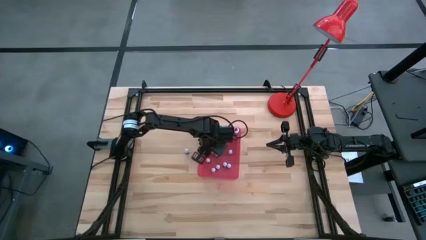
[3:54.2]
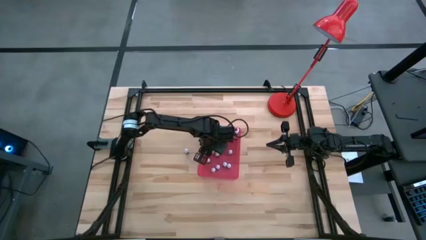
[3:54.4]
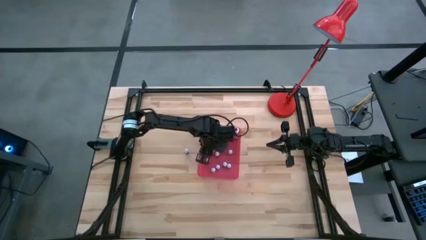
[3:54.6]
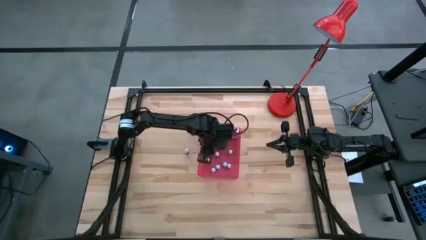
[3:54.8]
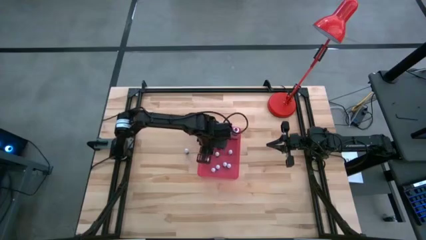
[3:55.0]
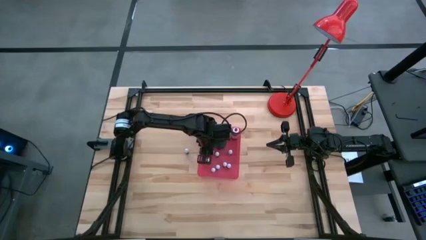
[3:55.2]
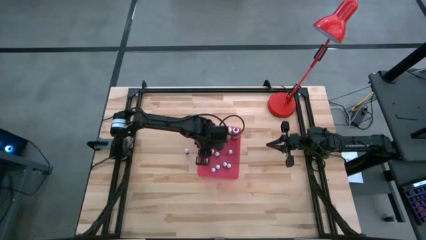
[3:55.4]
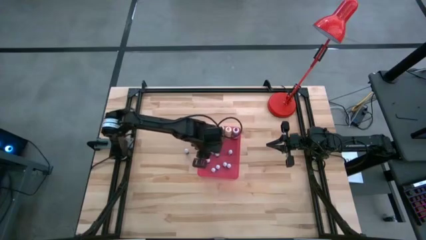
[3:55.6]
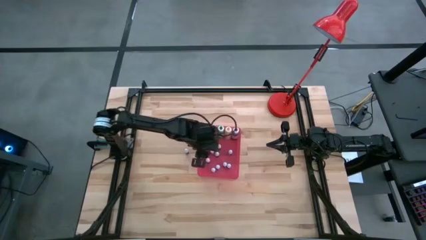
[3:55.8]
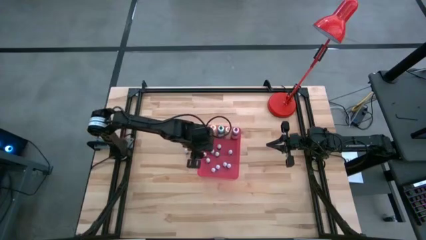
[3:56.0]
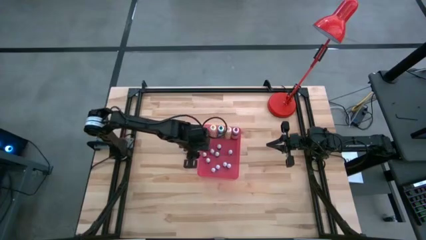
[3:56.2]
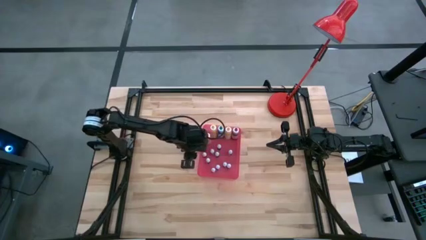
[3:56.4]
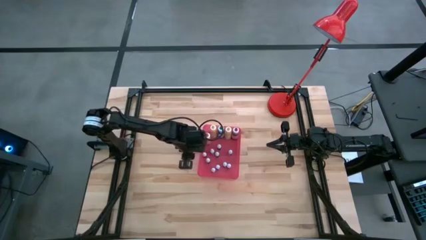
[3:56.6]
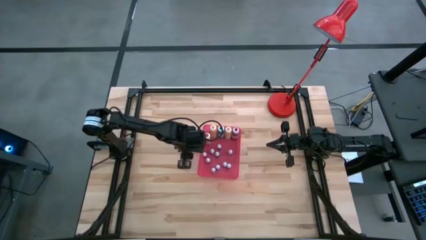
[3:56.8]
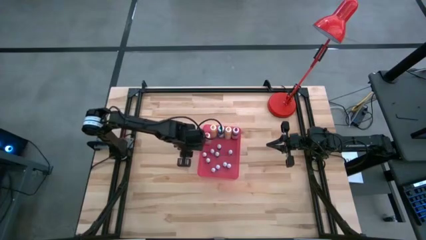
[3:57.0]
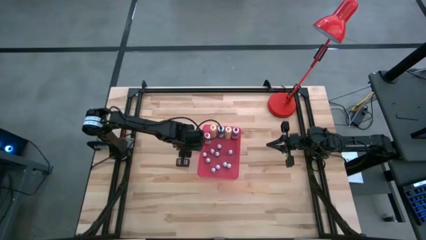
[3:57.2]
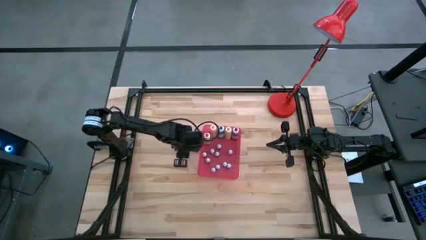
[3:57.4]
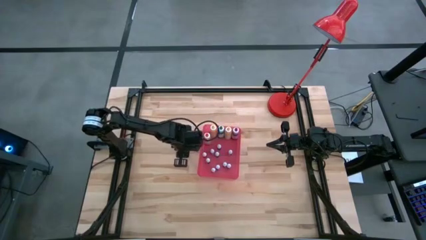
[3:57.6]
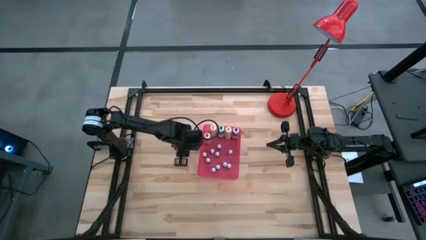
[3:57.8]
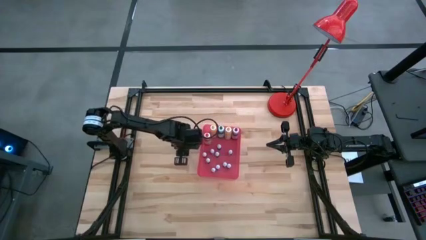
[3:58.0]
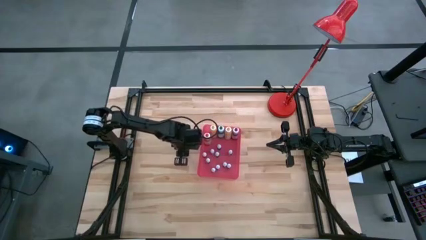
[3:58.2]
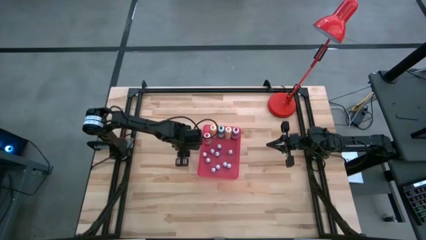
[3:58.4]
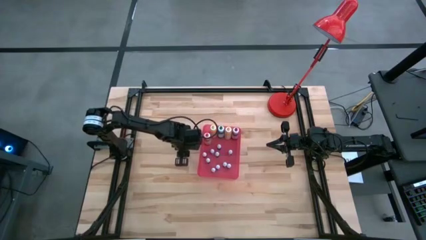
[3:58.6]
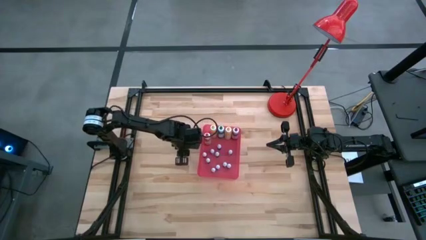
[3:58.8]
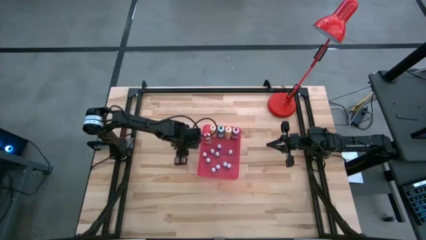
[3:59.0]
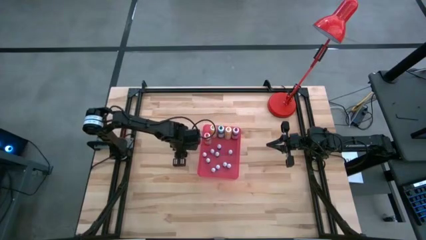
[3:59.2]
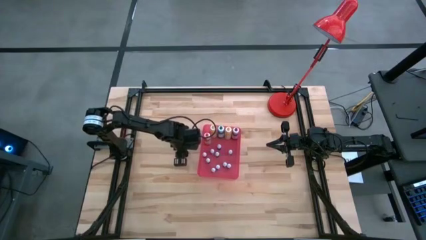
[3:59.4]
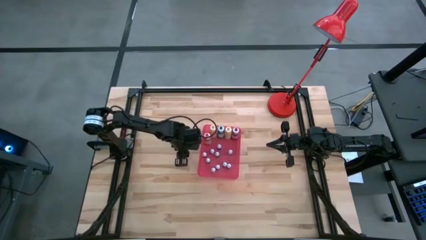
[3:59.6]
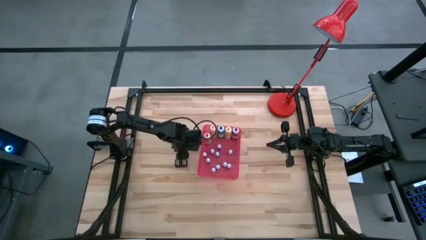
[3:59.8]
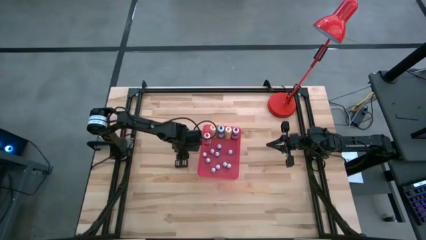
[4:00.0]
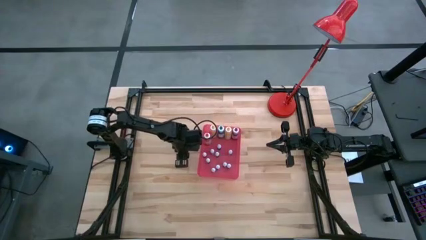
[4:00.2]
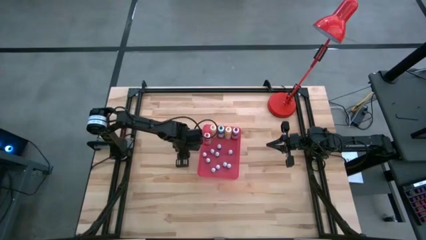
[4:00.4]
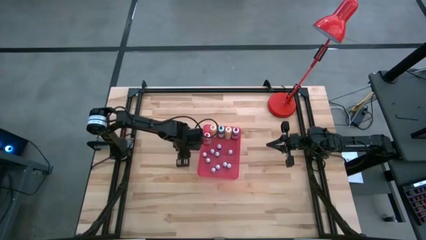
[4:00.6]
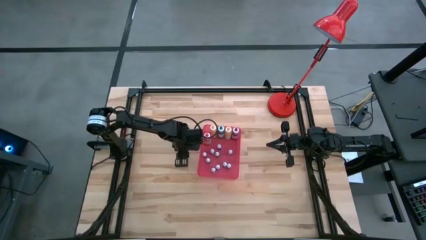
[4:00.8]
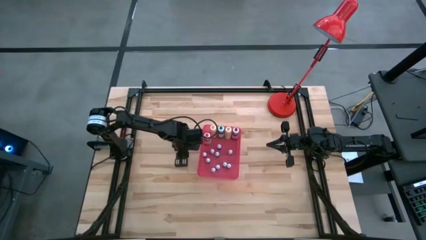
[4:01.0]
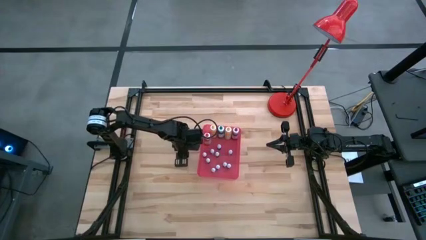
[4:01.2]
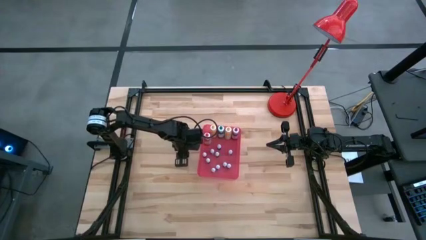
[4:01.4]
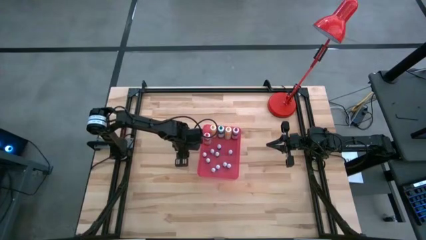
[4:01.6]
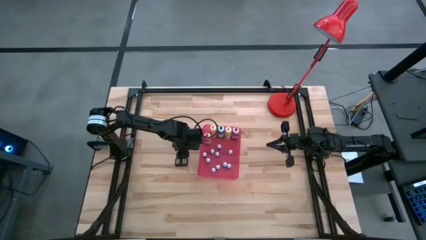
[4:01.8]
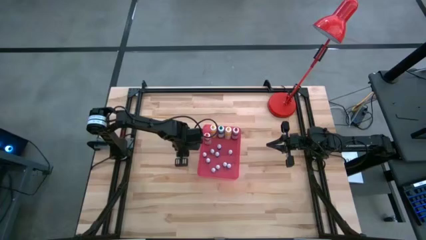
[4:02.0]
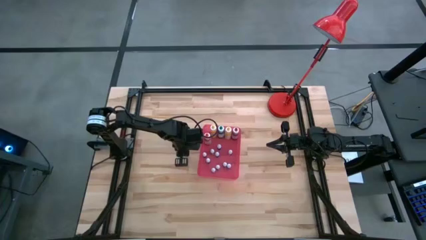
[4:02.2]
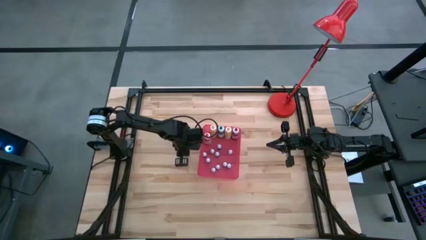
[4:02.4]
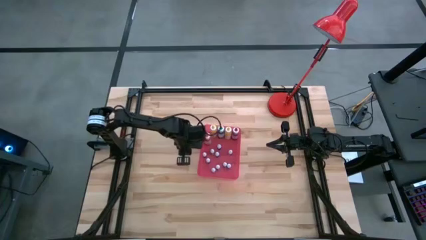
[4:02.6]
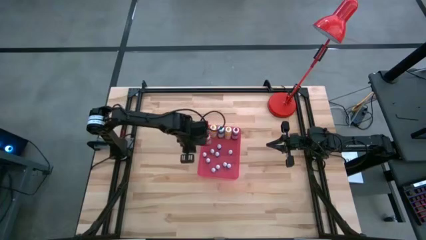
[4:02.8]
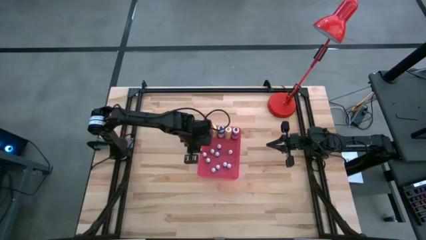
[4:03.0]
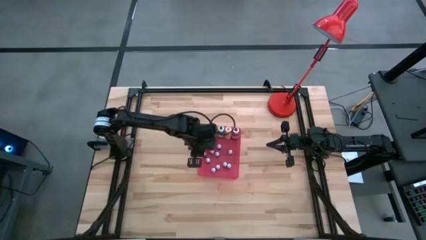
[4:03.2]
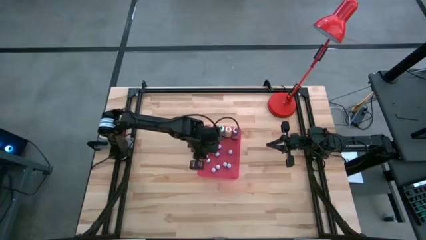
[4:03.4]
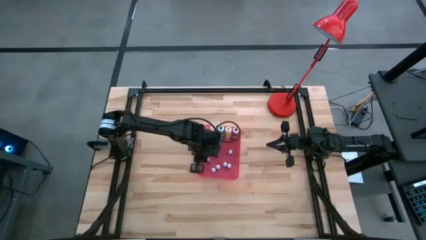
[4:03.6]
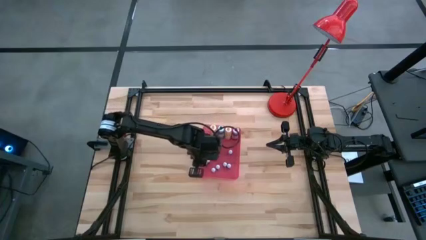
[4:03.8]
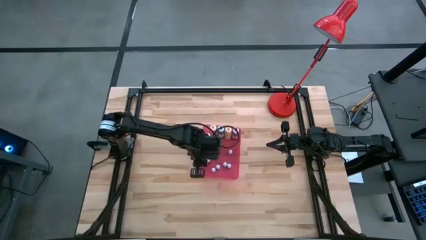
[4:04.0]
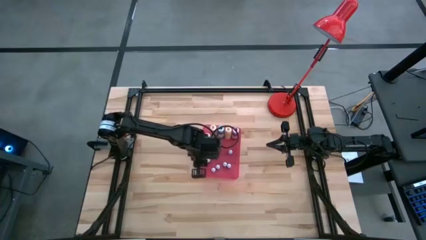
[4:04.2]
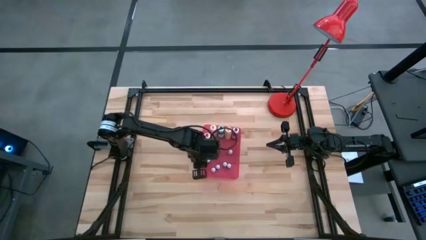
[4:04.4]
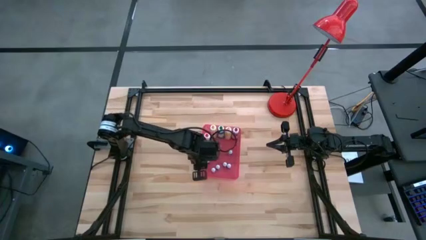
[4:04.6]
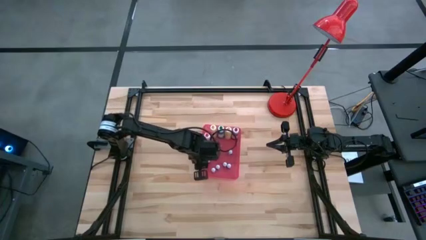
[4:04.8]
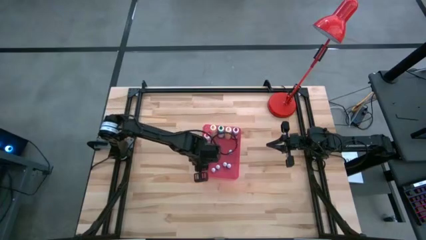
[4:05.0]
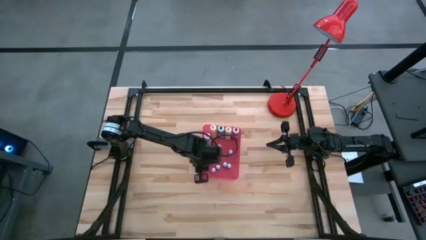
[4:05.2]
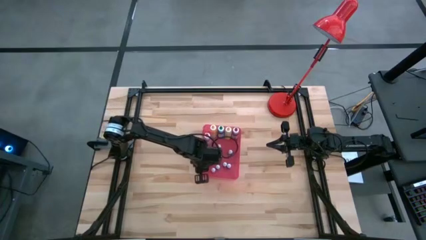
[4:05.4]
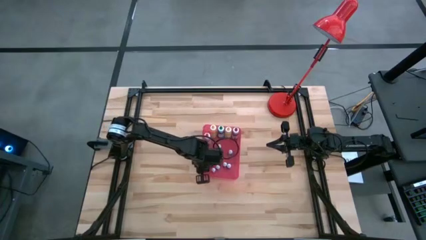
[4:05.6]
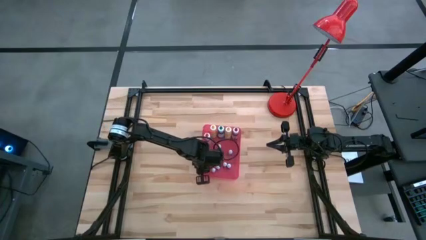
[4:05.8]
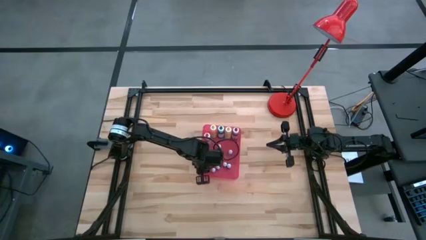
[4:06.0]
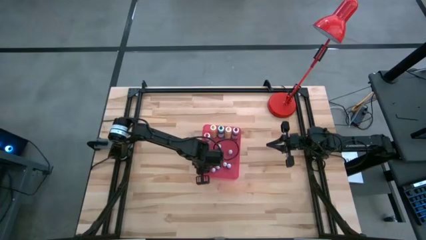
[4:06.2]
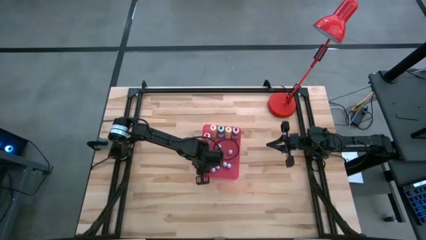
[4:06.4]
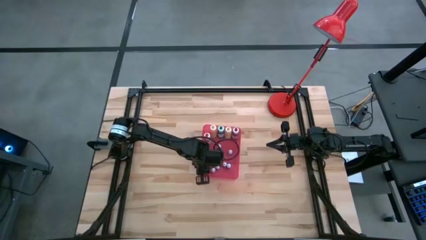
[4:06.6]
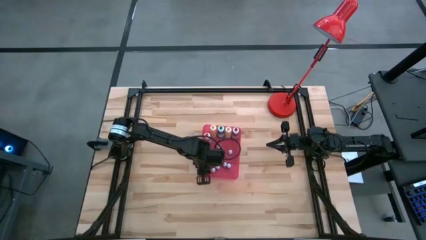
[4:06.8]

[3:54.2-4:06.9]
Task: Pick & Place food coloring
Put the small food coloring bottle into the red bin

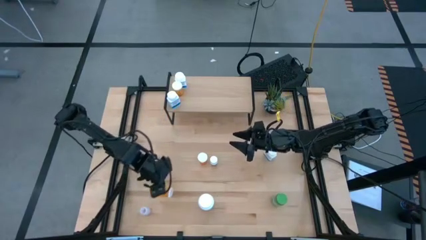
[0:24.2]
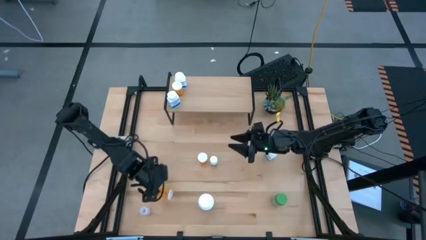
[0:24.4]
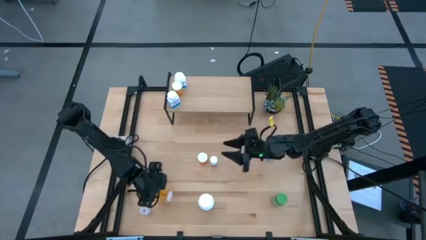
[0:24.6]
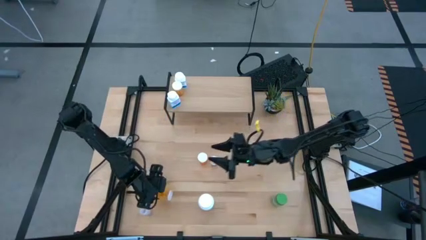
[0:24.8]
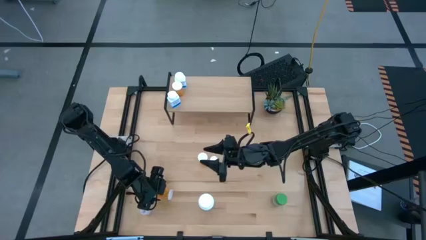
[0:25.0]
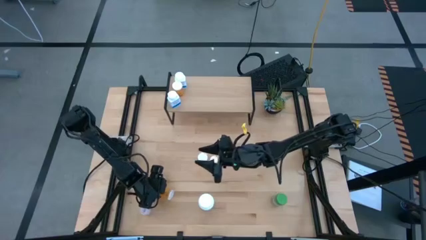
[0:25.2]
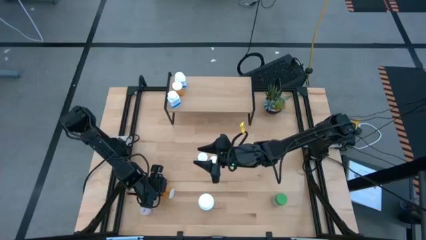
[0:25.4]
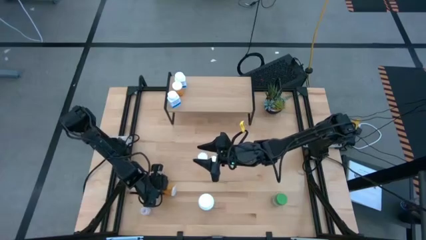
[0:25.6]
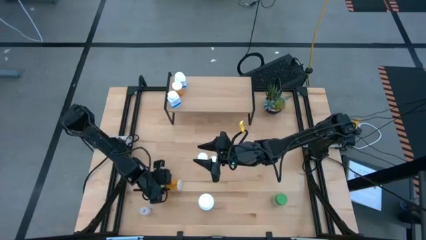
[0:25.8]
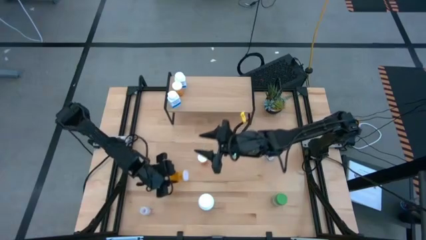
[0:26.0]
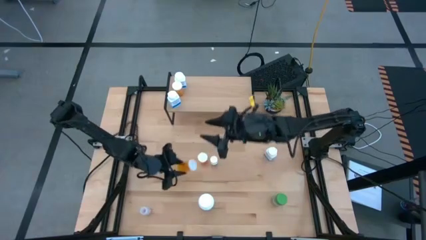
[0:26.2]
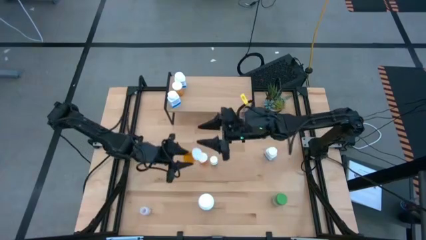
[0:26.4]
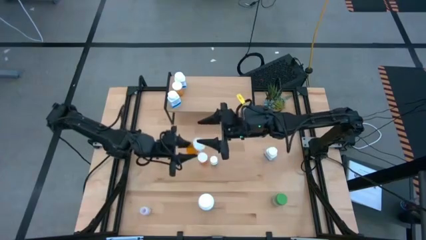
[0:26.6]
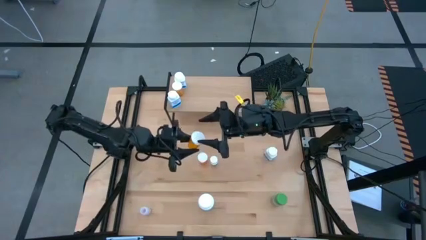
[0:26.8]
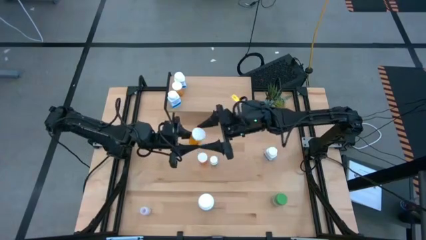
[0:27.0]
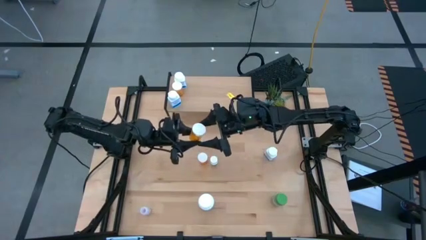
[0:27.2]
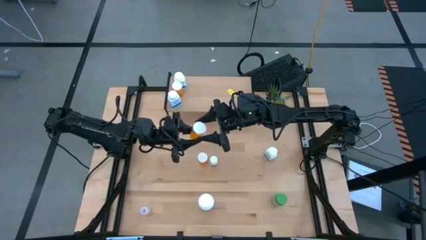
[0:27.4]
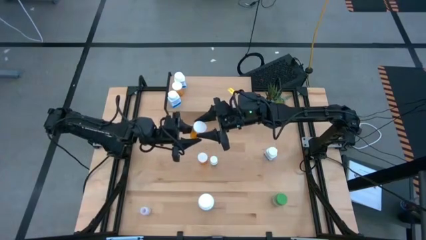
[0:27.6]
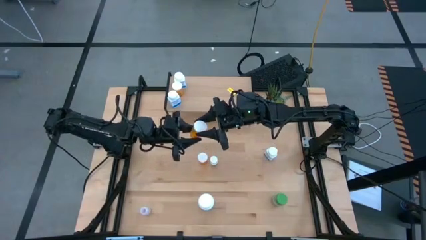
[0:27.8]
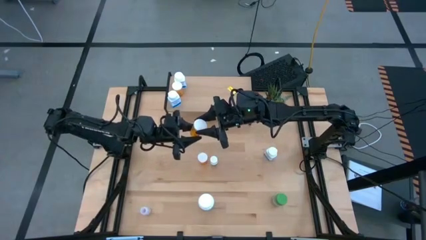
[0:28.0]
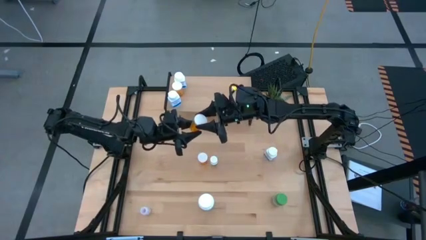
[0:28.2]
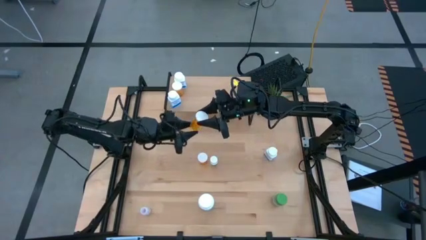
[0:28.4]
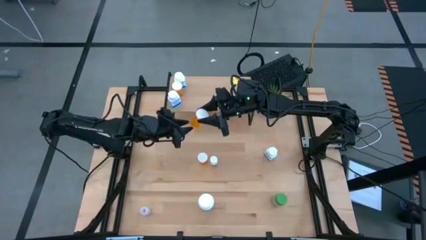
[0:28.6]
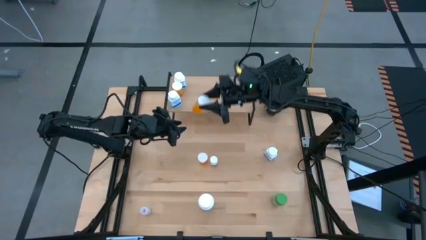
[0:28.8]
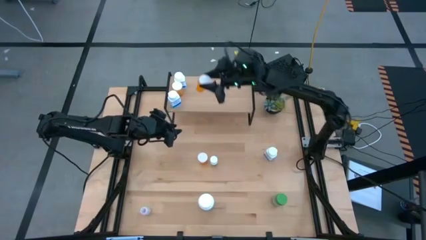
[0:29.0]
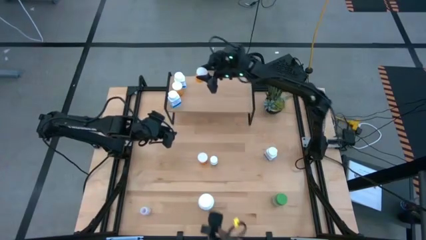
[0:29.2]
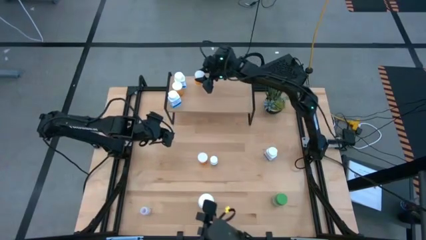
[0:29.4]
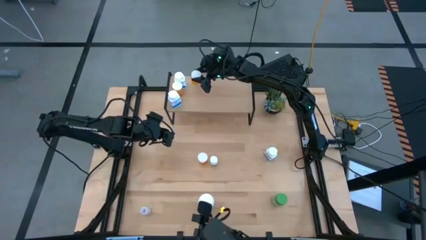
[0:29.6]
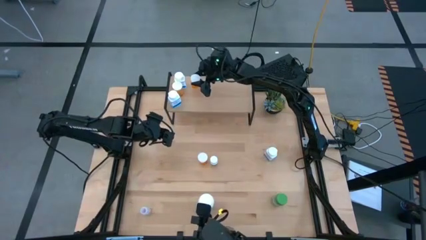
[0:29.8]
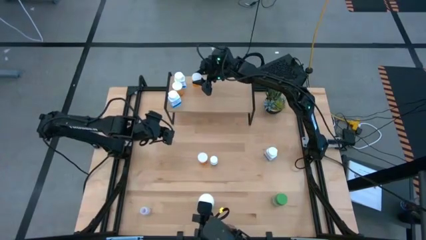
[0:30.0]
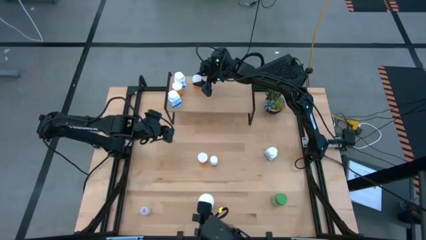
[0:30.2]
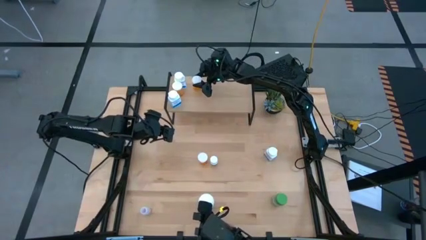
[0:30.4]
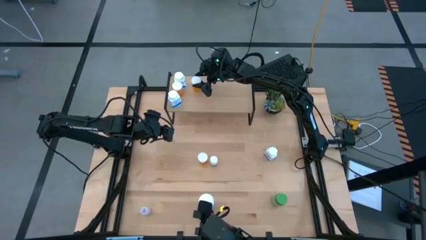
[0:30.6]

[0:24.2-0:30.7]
Task: Pick and place medicine bottles onto shelf by color
Put the bottom left orange pill bottle on the shelf
